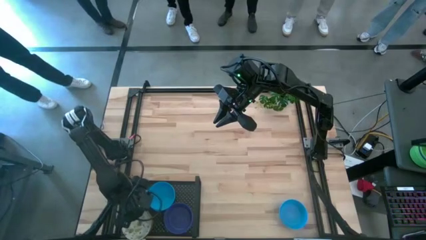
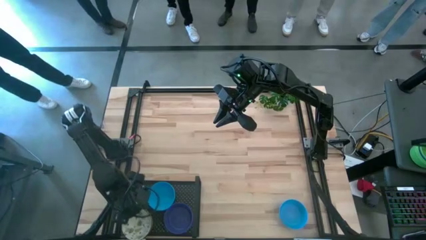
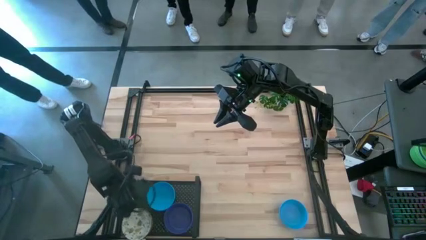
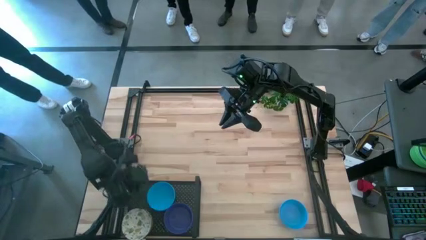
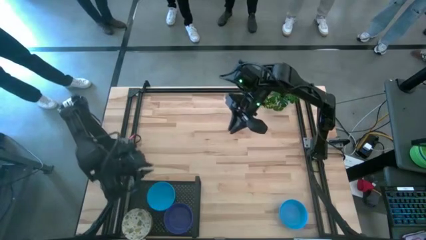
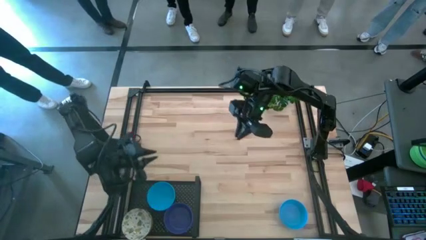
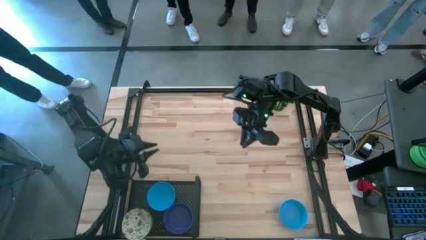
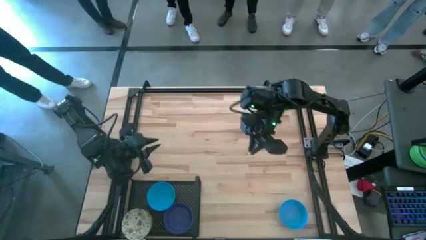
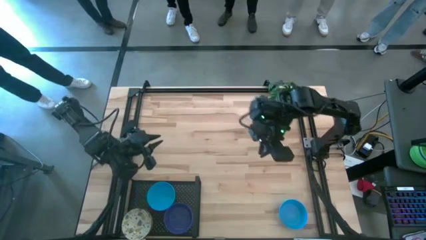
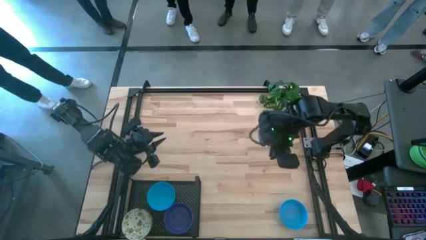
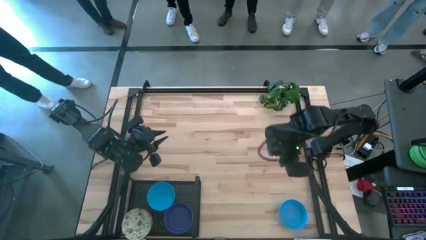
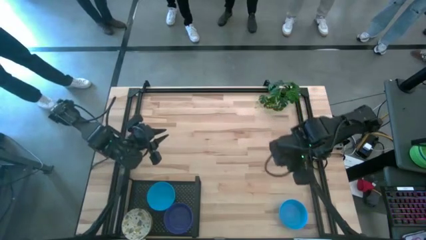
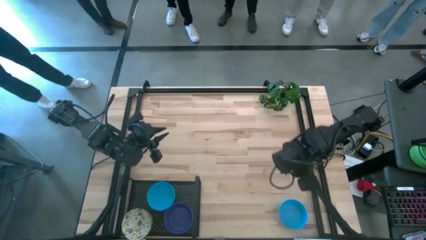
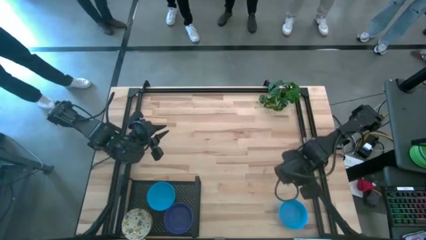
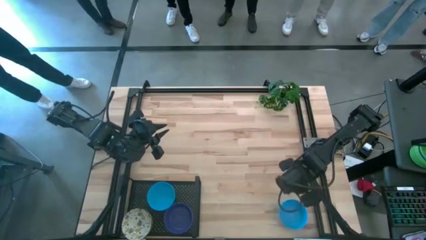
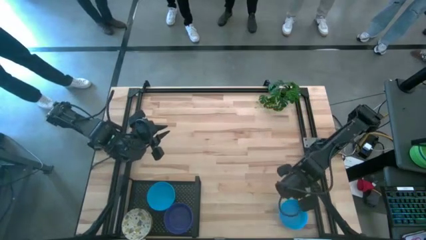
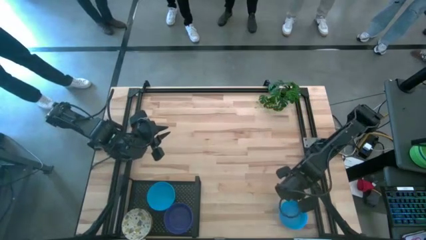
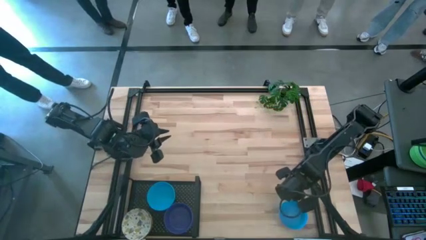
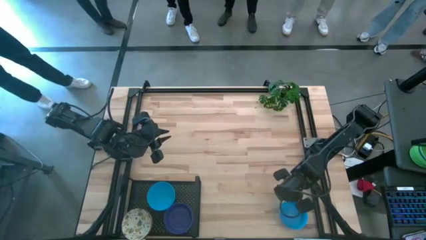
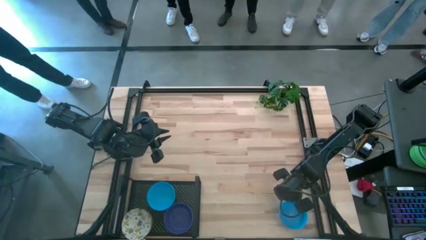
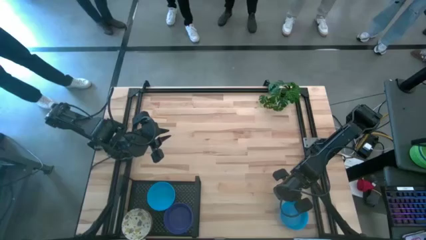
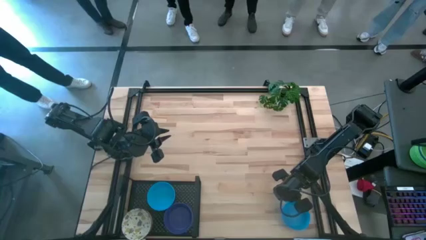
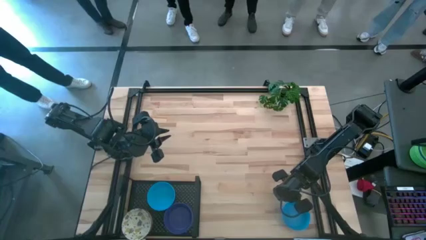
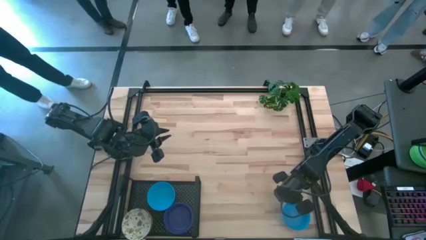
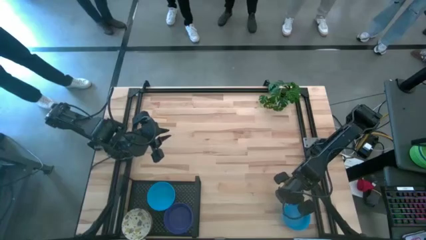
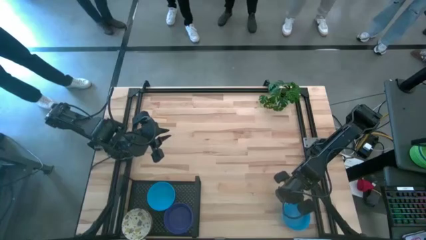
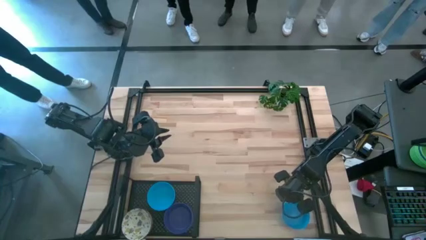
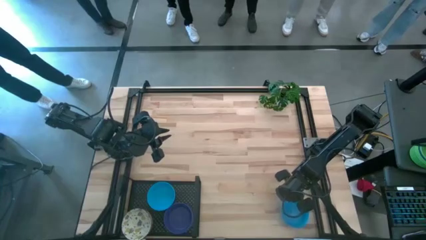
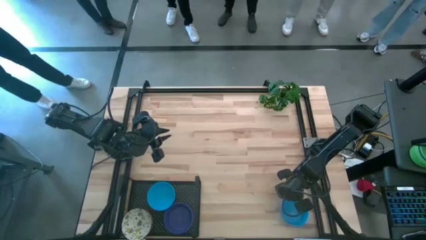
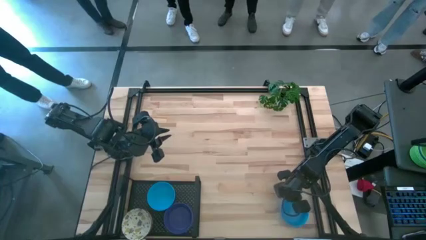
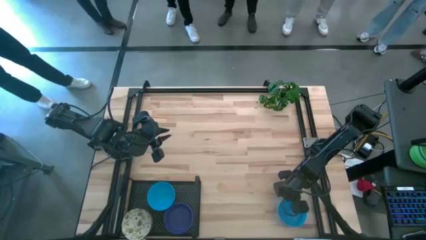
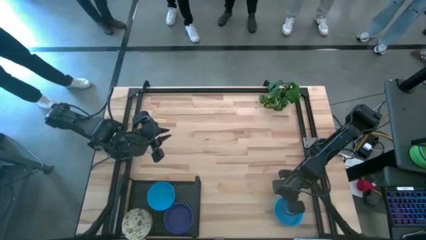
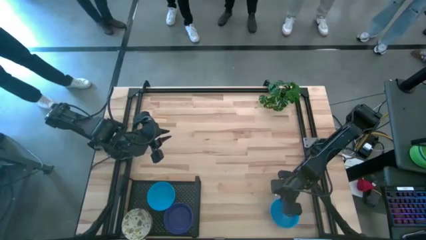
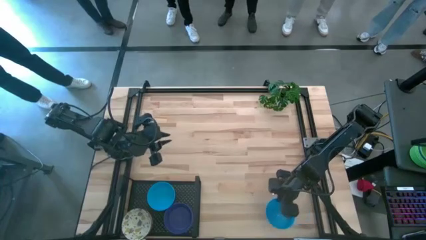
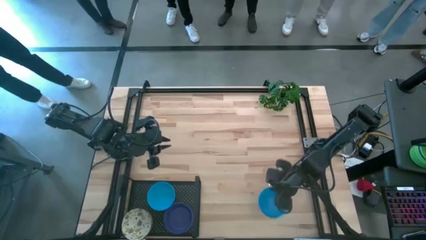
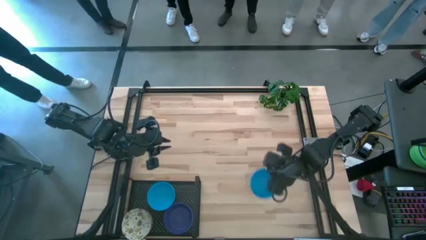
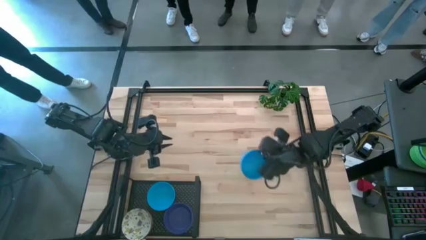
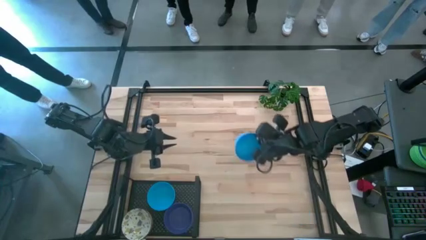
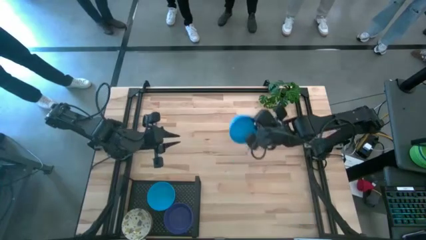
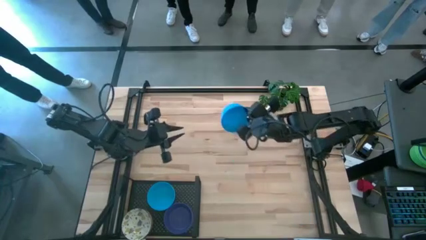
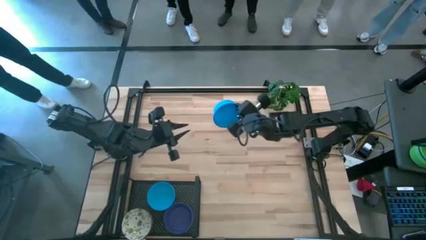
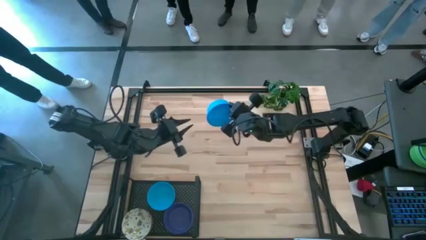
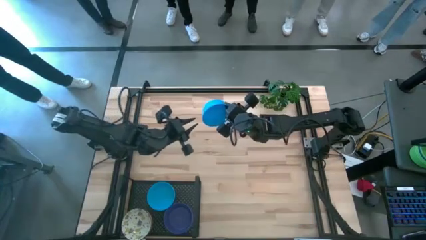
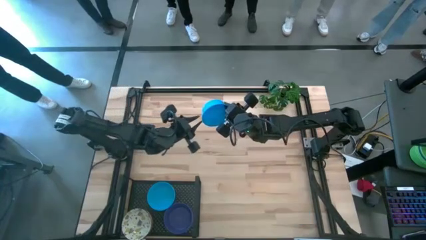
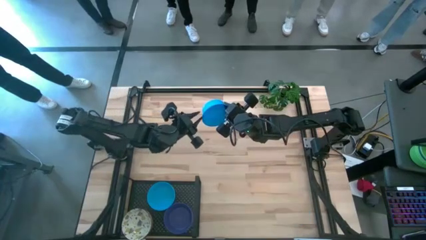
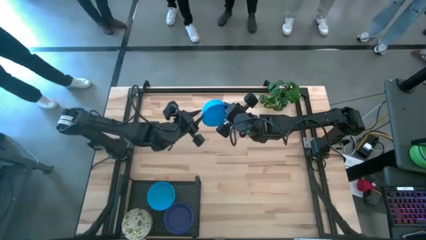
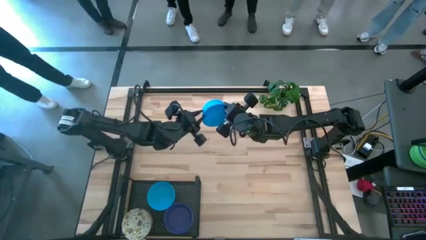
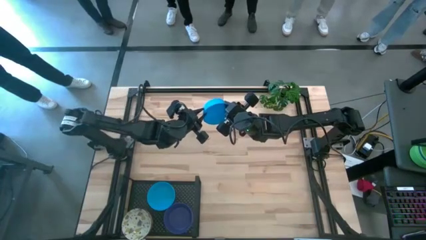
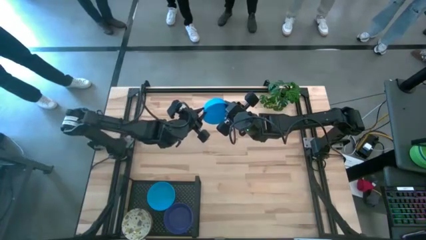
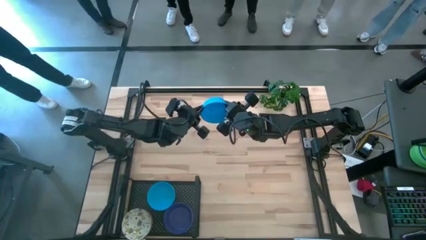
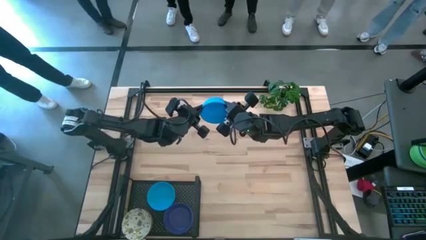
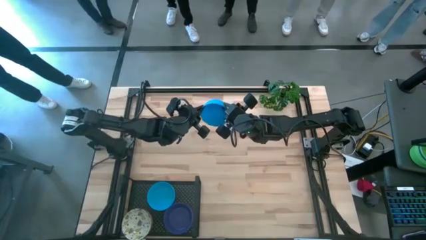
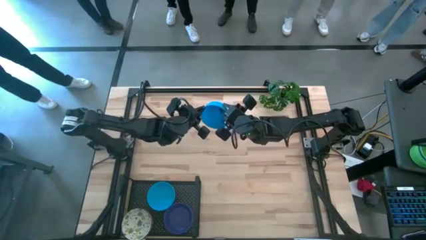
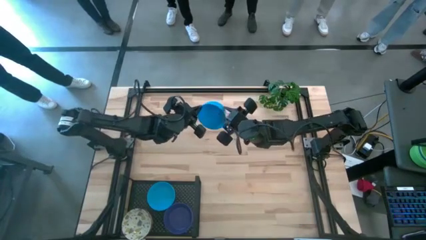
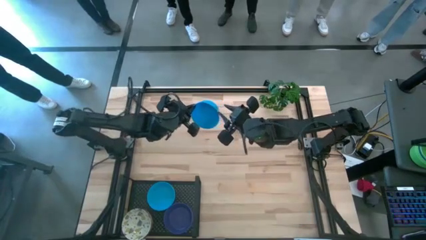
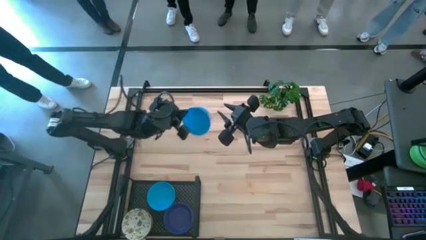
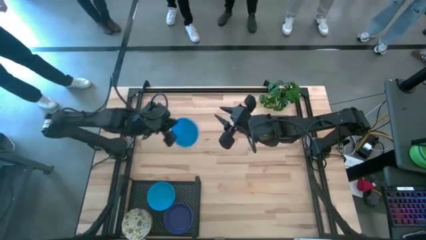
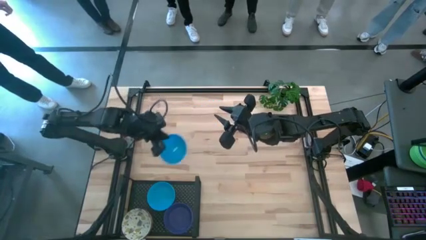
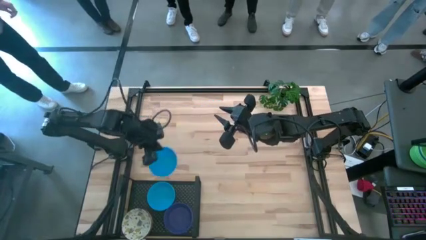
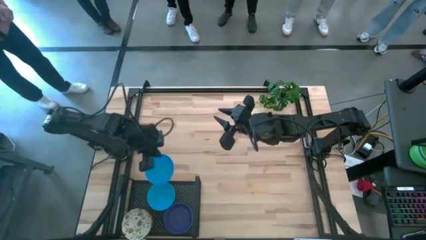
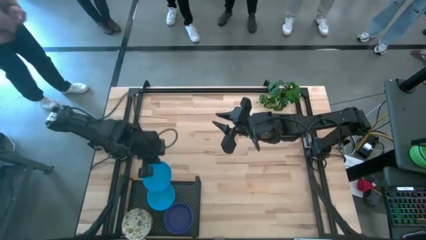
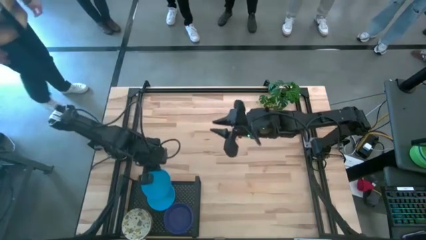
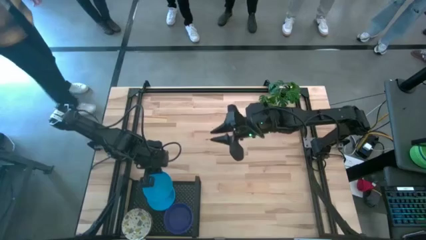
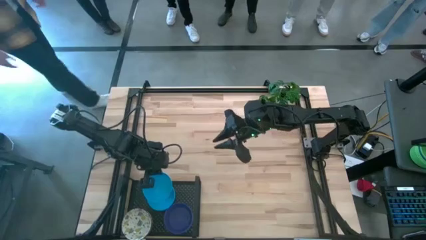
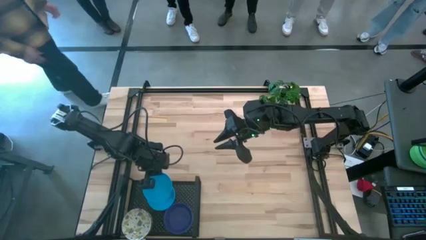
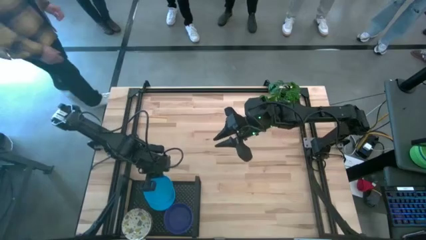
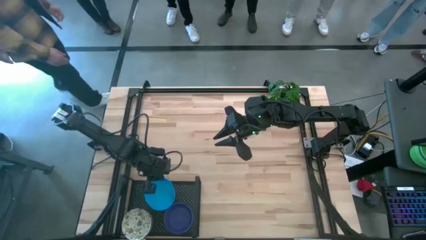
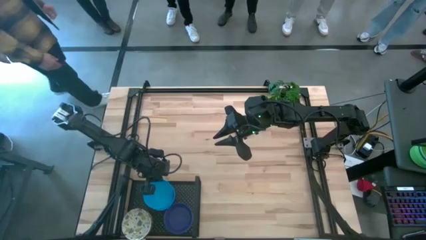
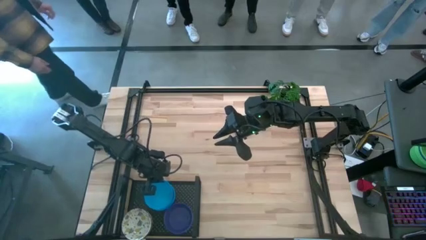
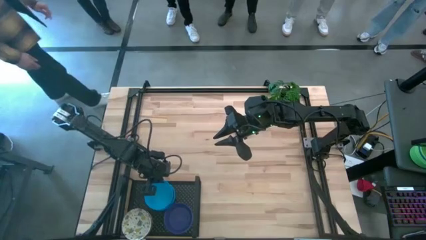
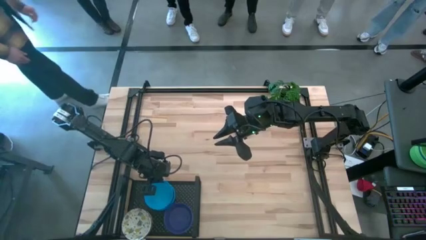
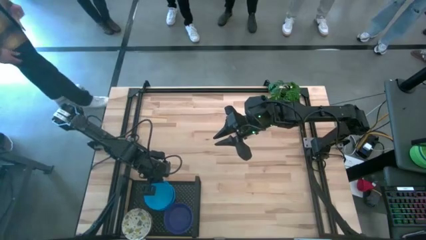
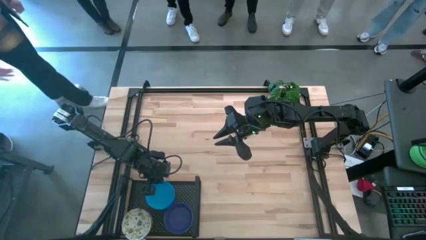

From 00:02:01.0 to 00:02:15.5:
Task: Pick & Place Mini bowls
Stack the blue bowl on the blue bowl on the shelf
